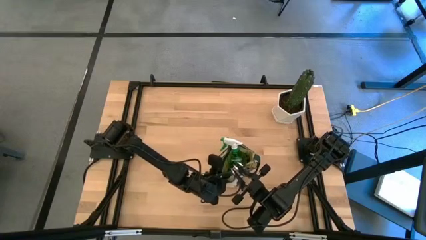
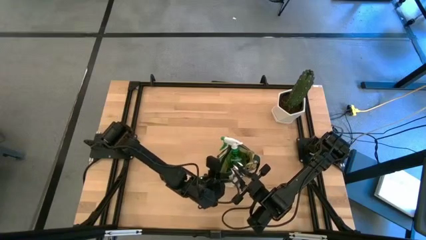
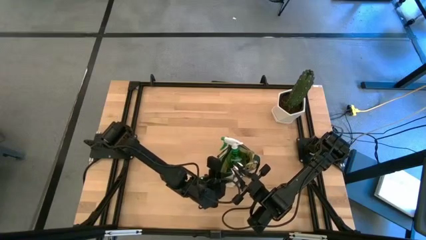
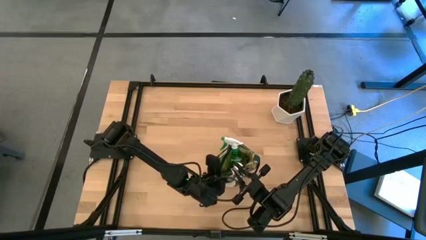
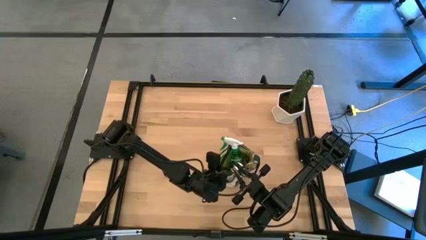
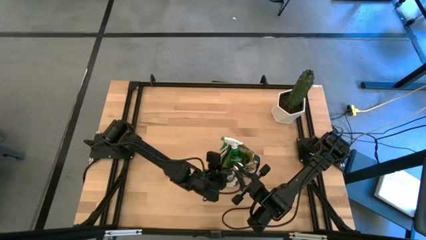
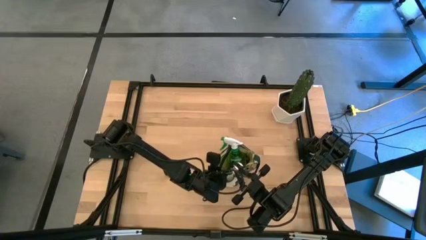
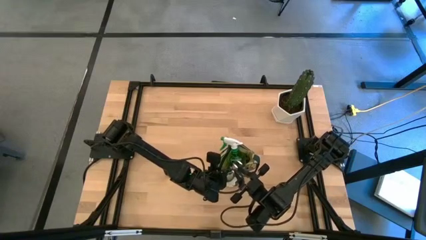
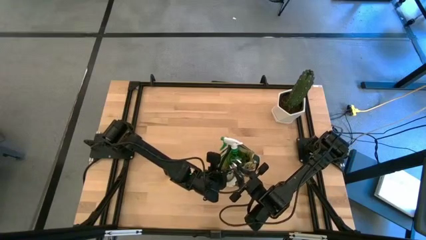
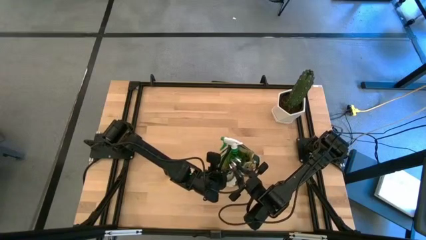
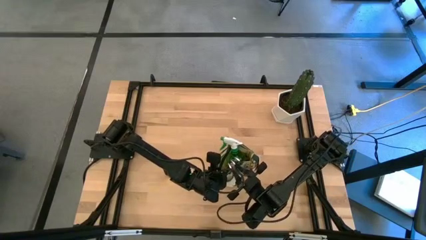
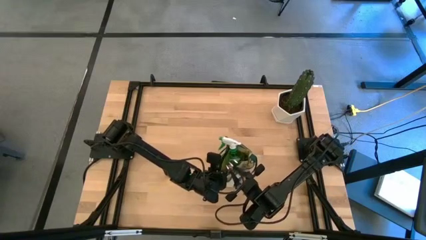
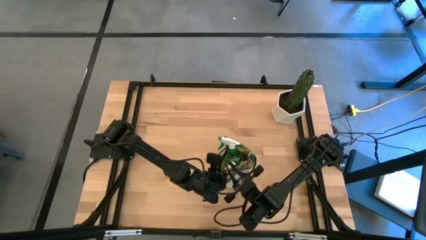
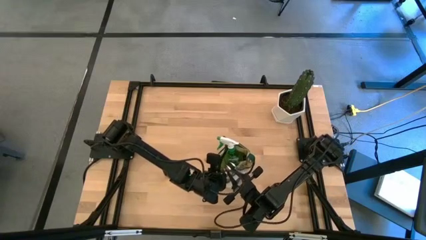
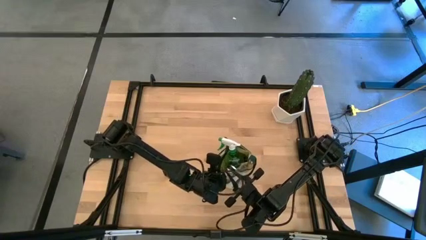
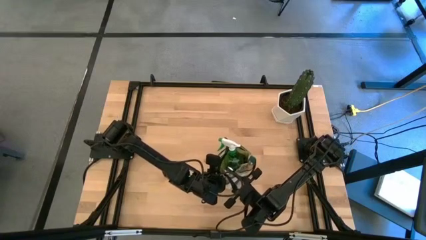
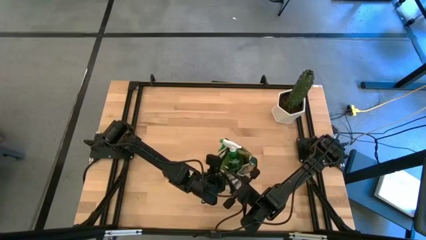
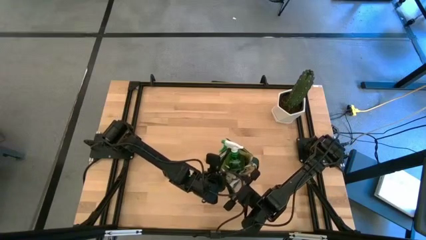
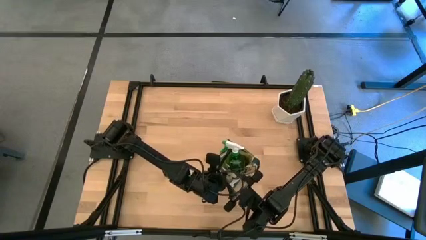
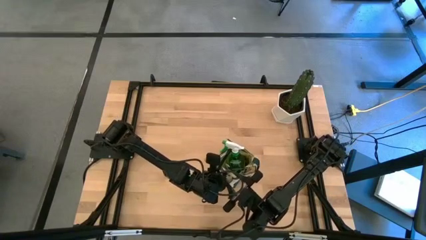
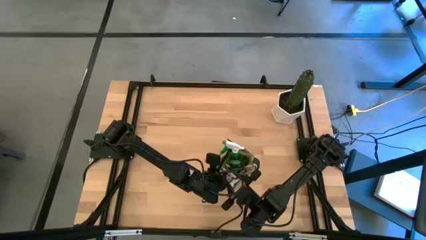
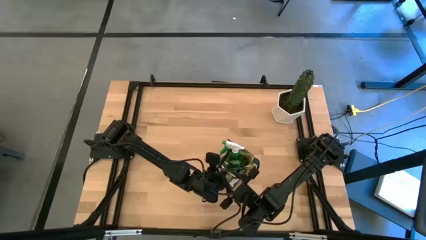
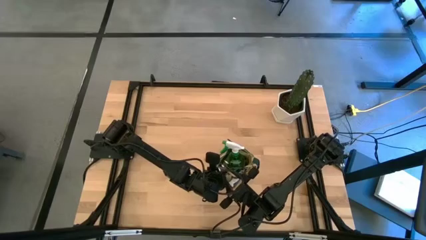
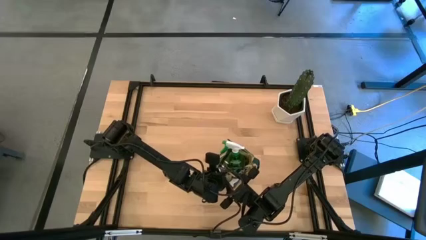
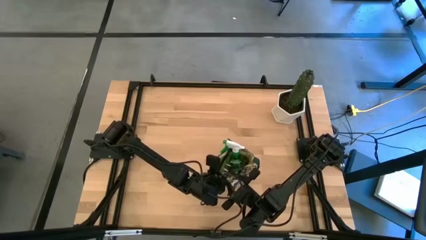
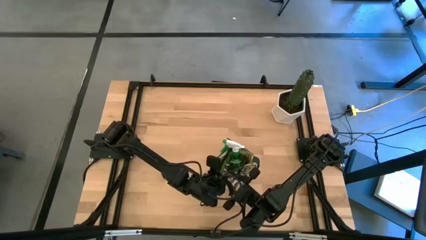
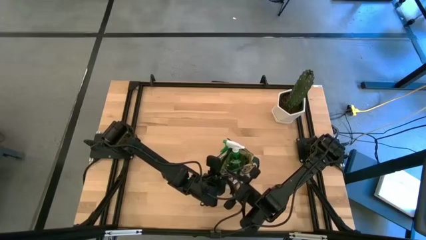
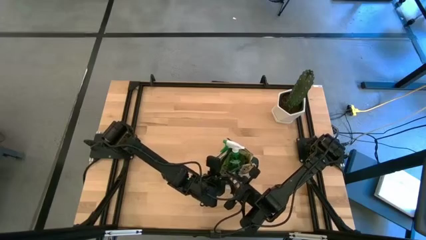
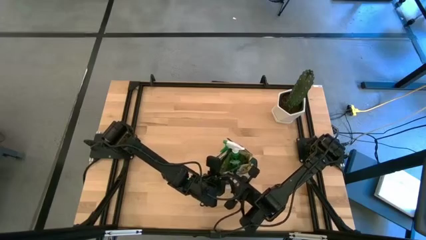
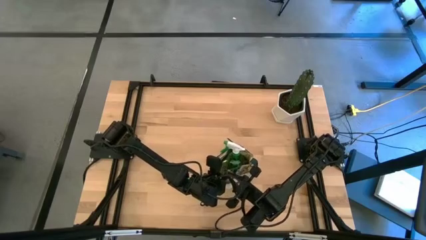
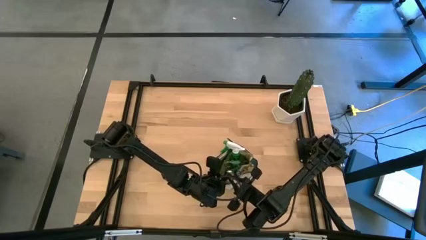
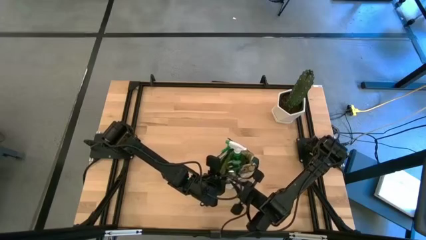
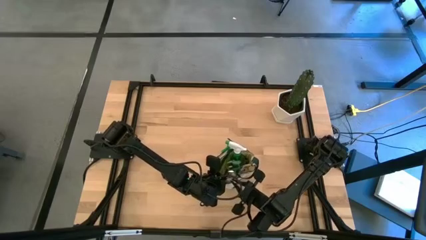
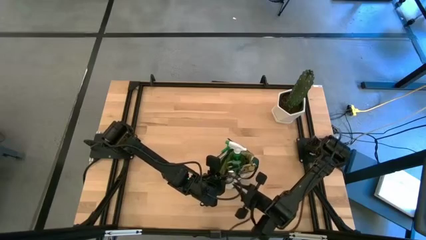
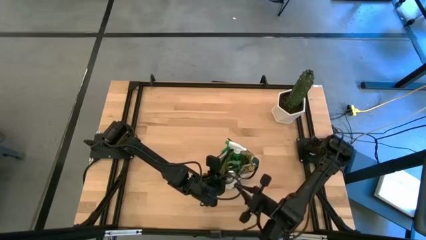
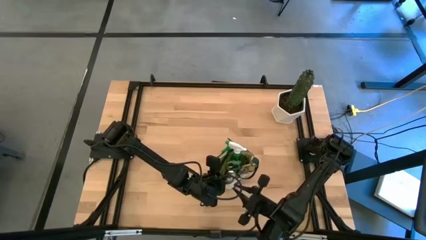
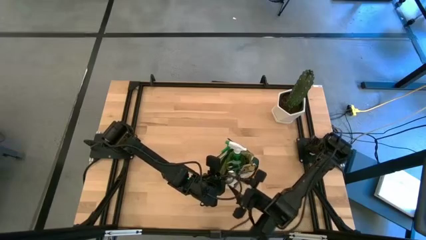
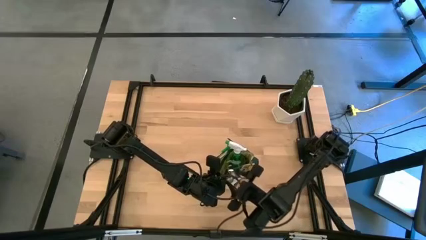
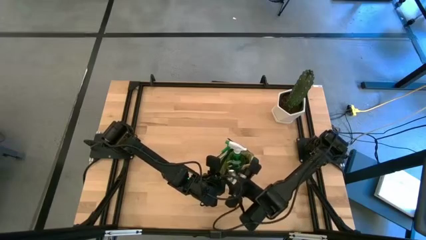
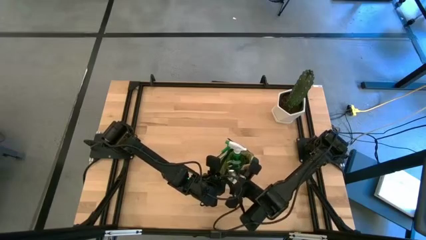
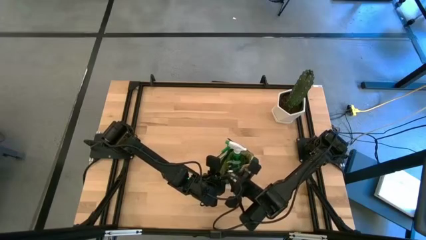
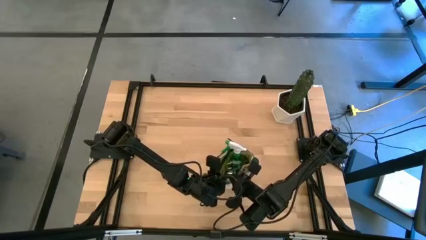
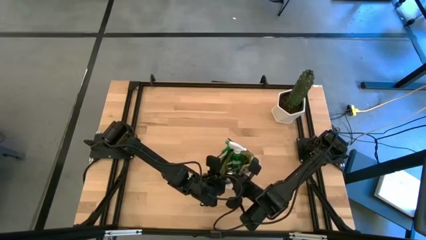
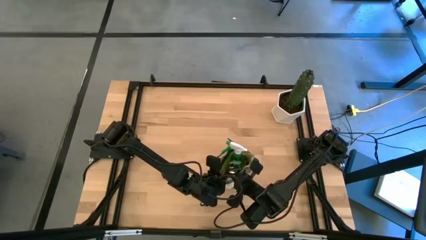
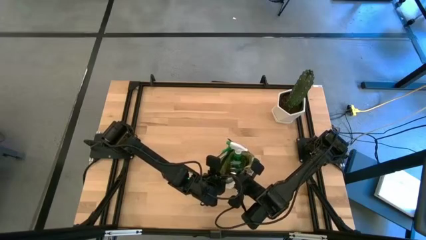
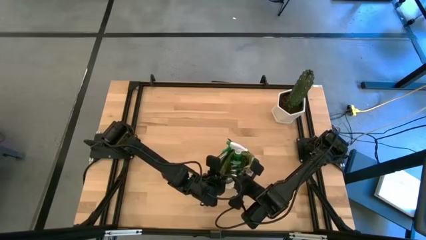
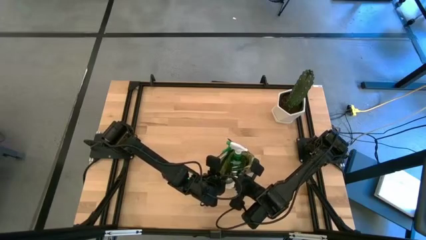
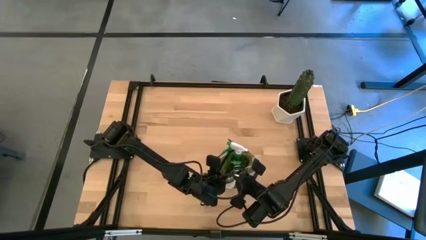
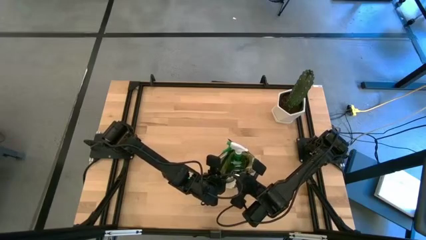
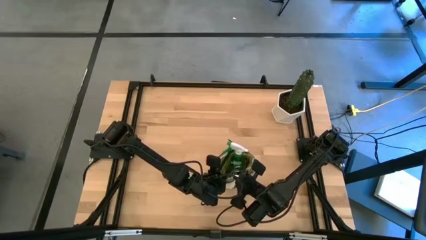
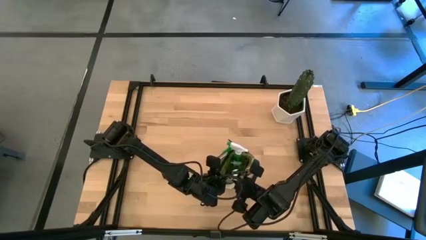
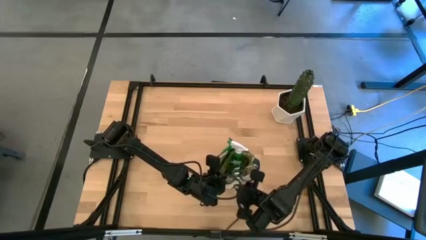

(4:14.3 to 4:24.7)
Task: Pick & Place Garden tools in Gardening bag
Put the brown hand rake into the green gardening bag

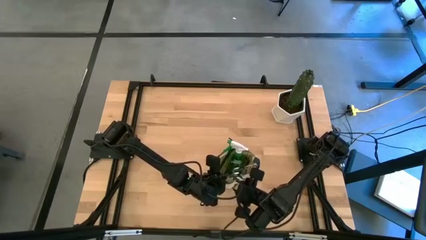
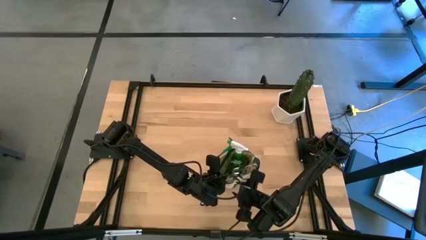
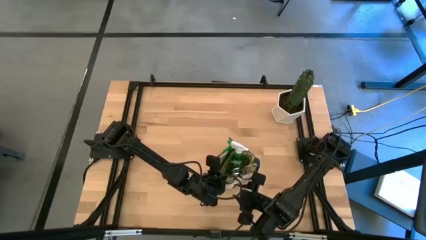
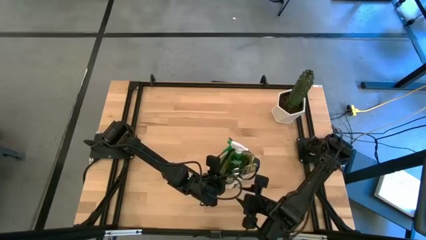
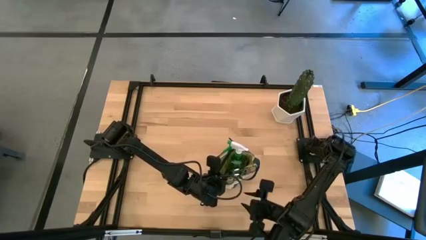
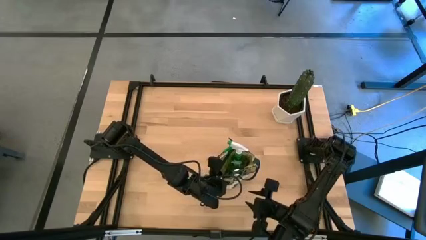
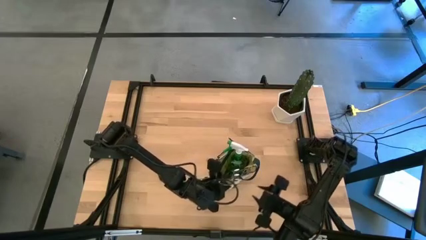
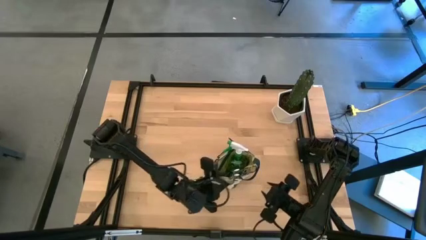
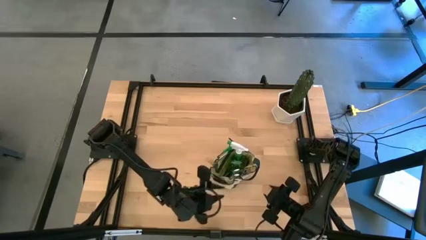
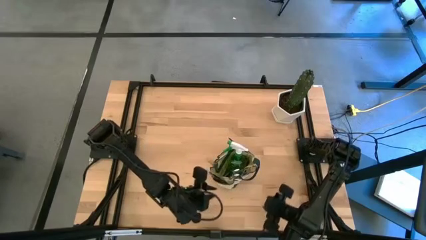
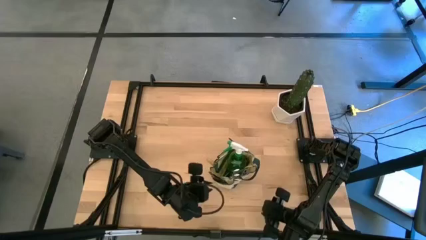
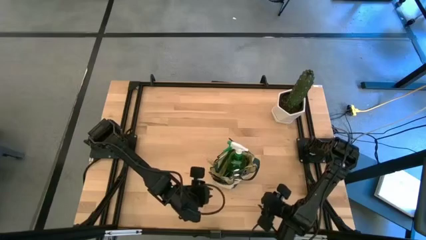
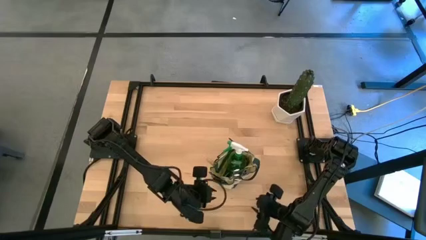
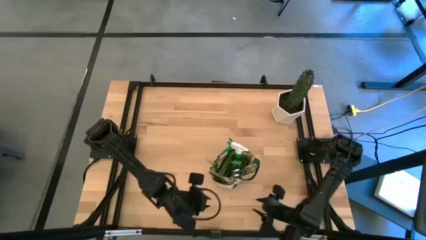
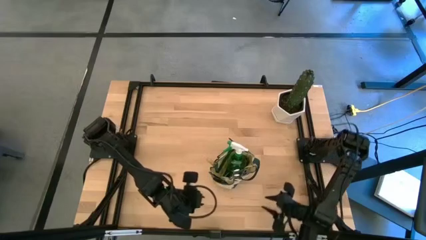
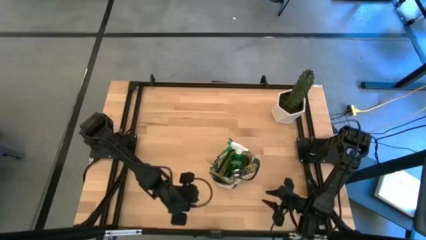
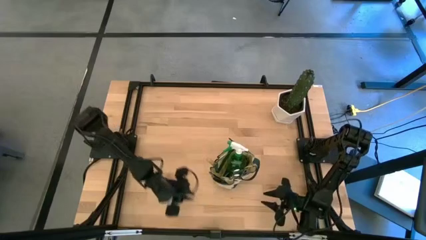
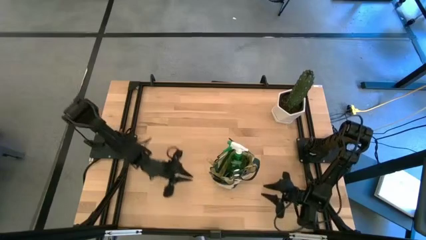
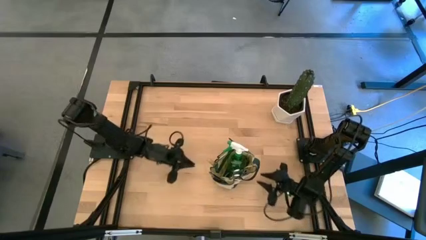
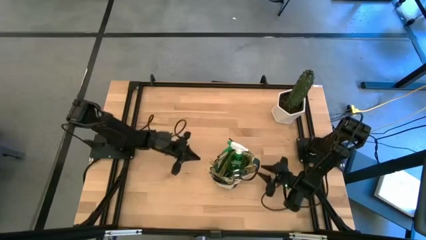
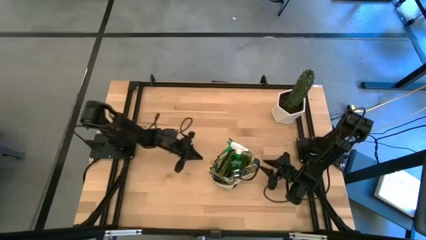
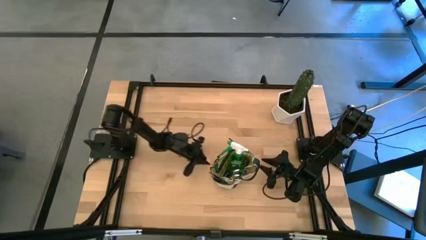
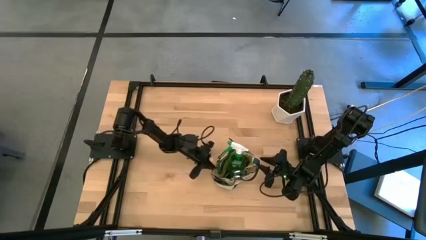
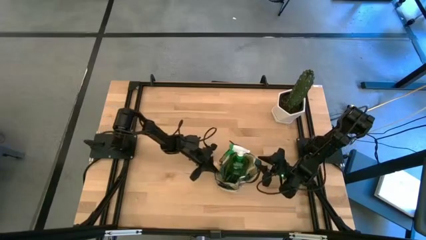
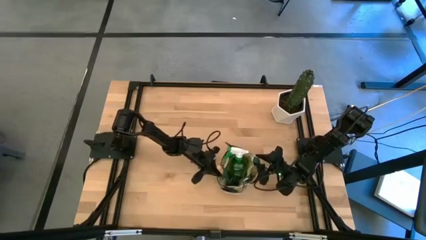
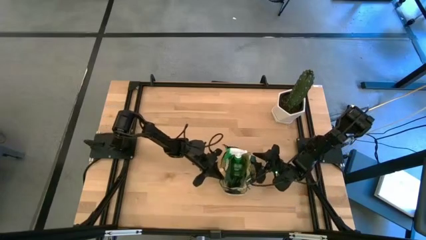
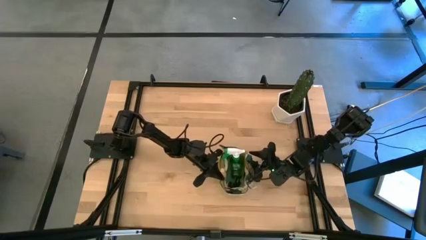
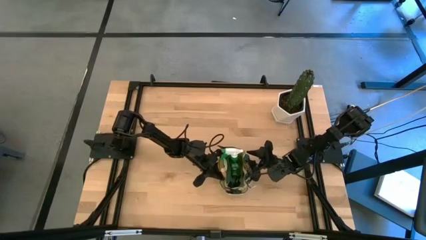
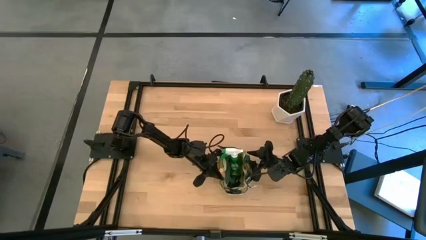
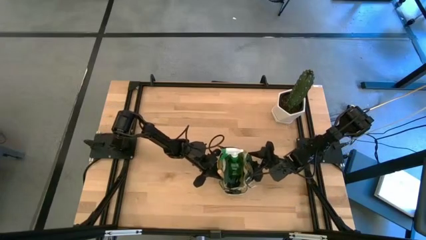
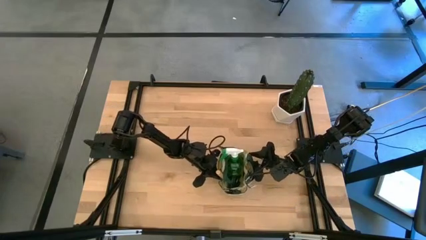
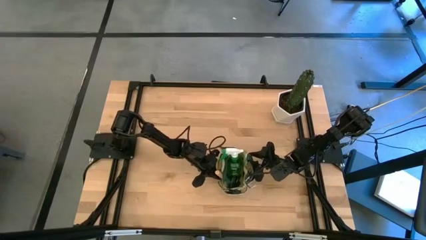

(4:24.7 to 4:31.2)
Adjust the green gardening bag
